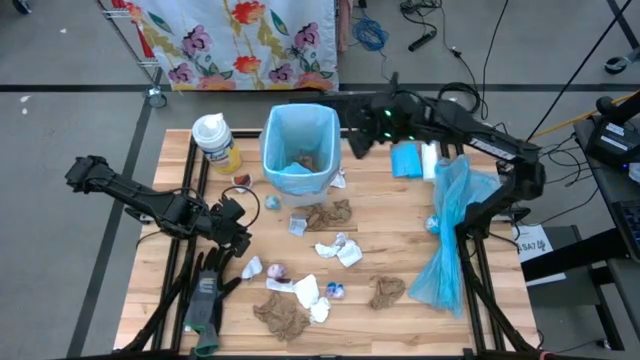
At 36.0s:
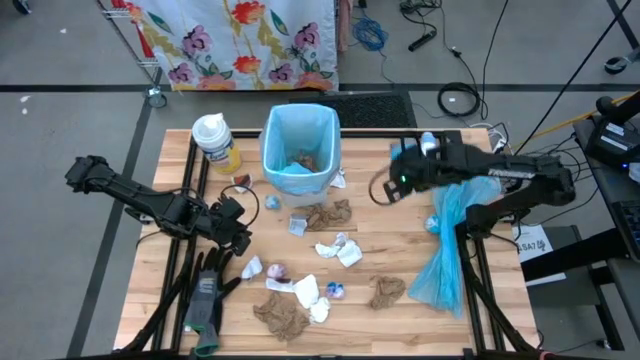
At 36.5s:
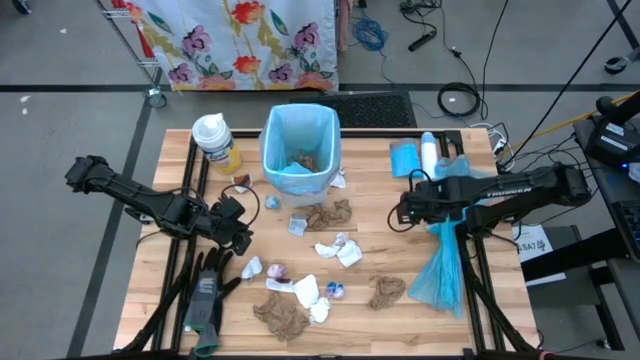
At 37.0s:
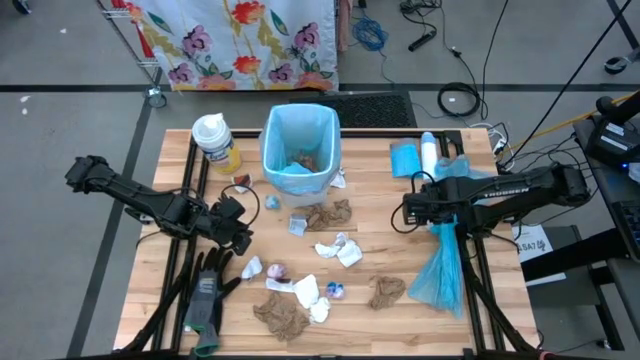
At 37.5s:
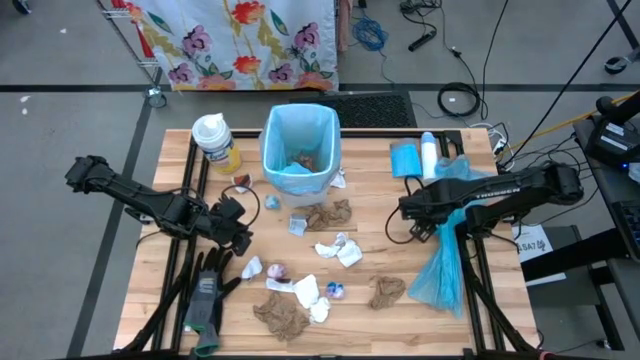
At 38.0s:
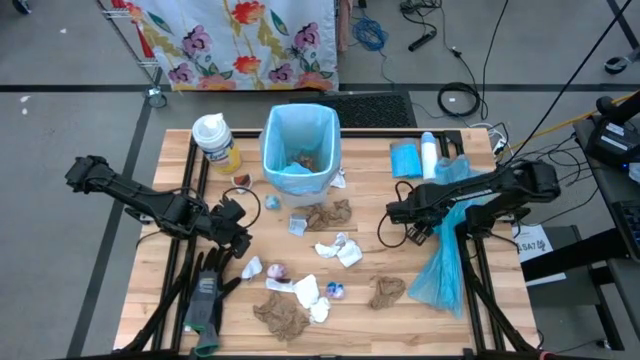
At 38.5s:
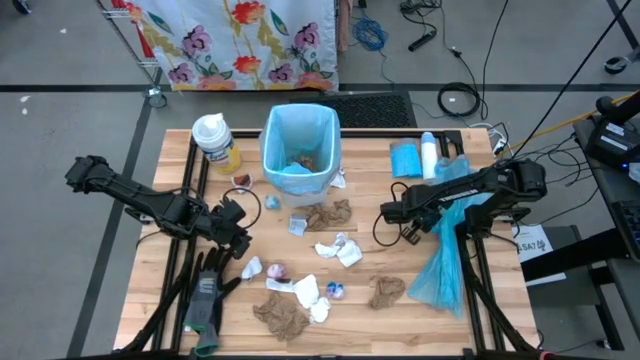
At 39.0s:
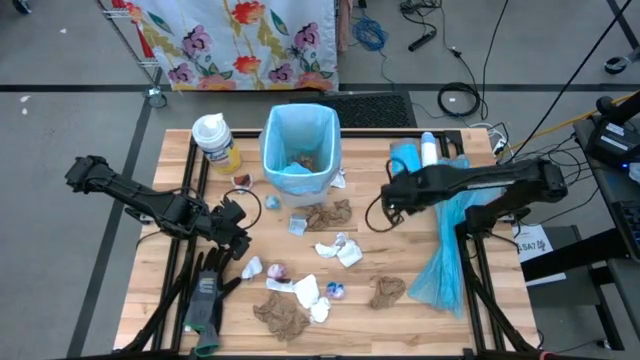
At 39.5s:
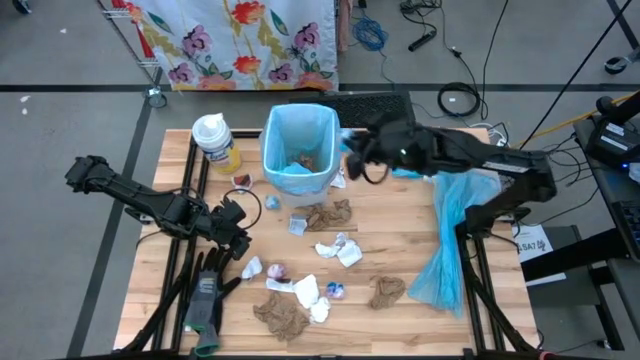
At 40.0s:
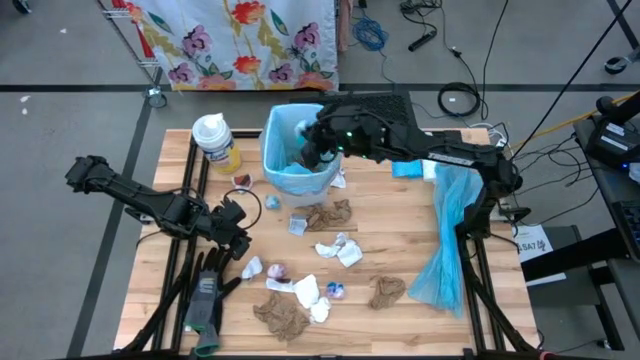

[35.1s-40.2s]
Task: place trash/remove bag and relplace
Put the blue plastic into the trash bin

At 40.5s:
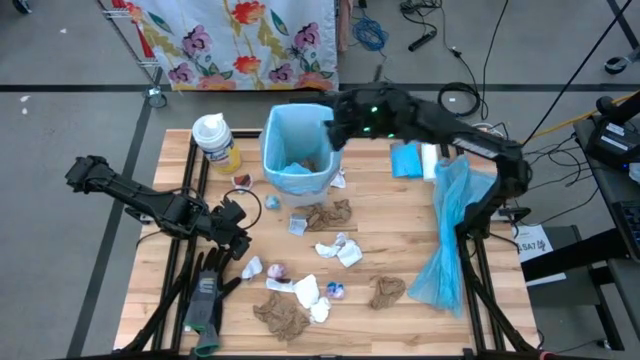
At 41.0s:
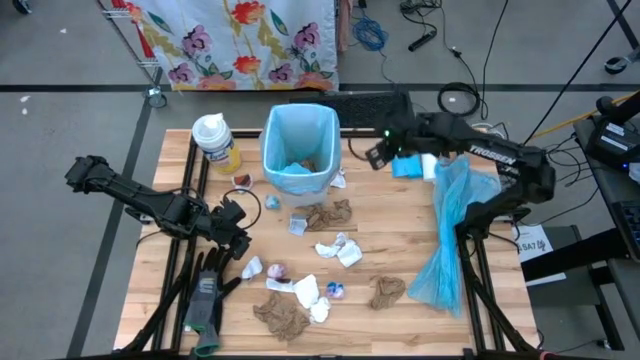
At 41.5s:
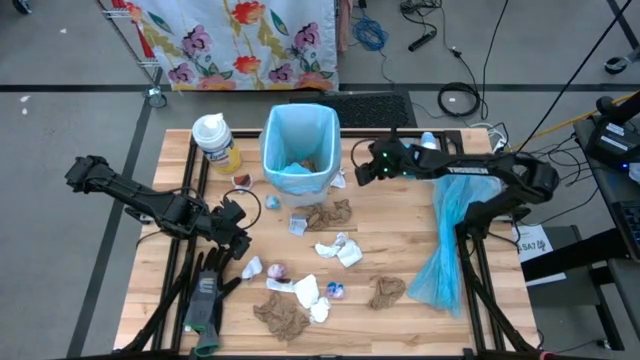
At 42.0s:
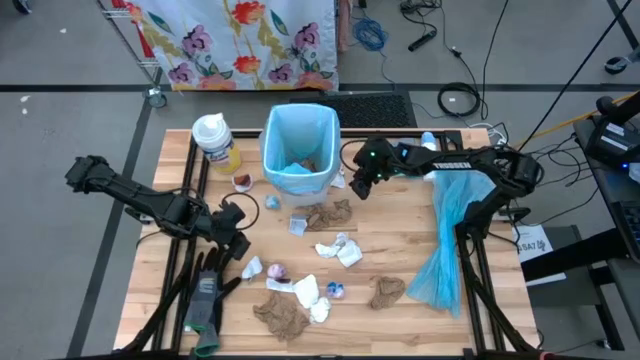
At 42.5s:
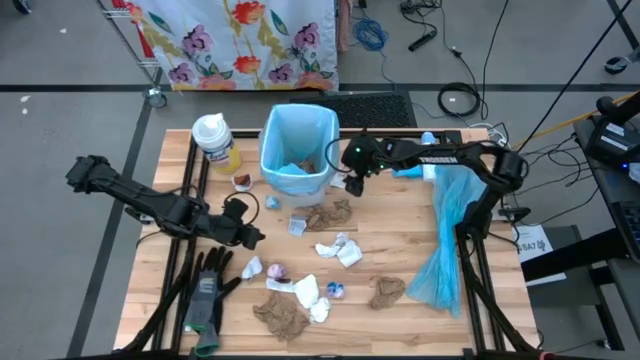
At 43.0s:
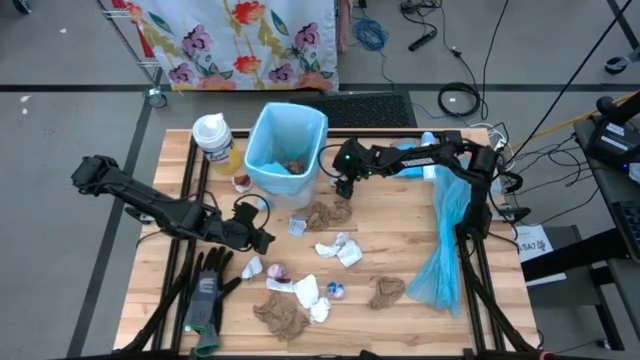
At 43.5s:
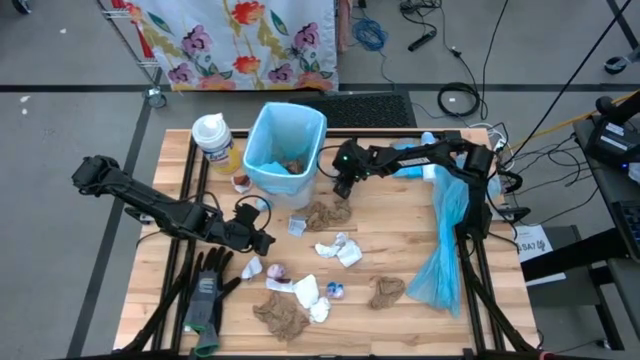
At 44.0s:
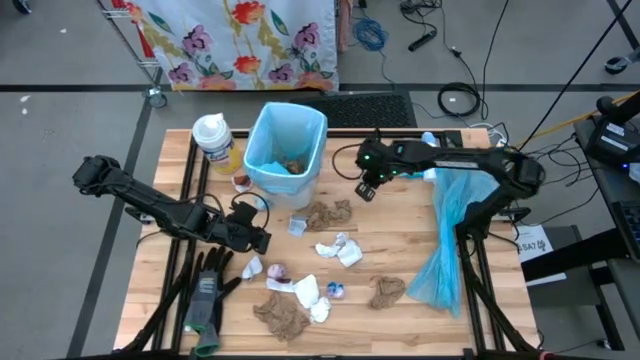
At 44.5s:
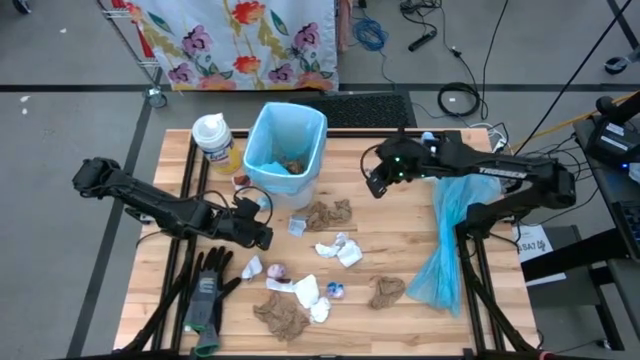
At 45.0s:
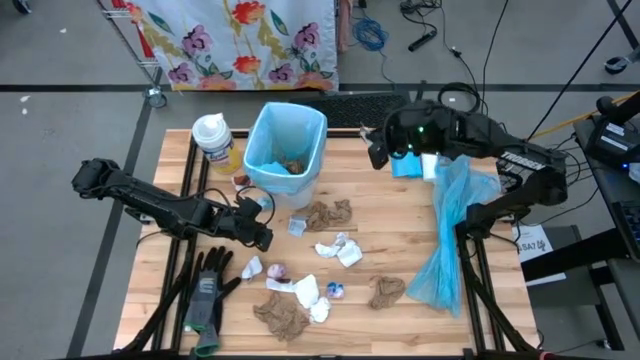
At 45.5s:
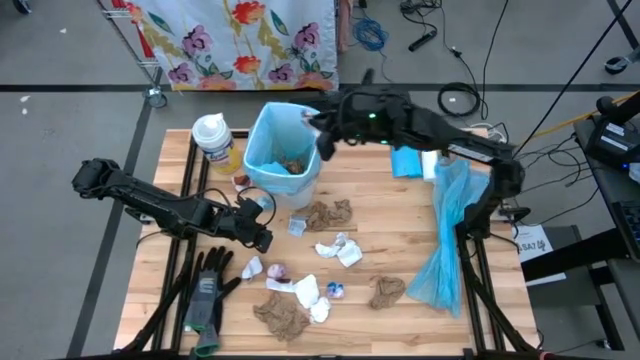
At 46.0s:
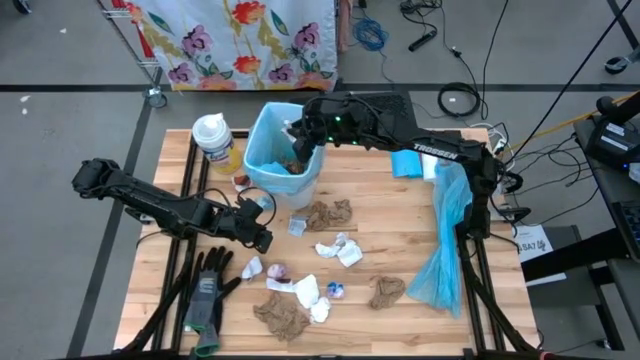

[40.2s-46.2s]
Put the white receipt paper into the trash bin

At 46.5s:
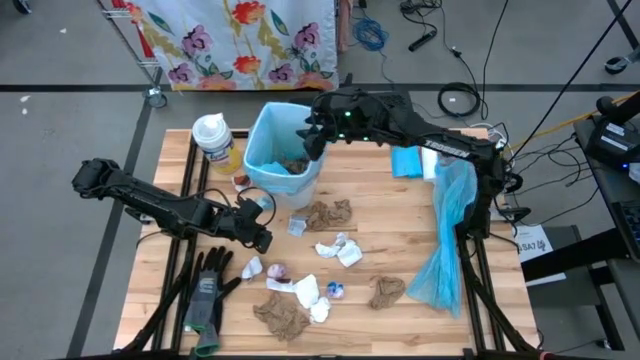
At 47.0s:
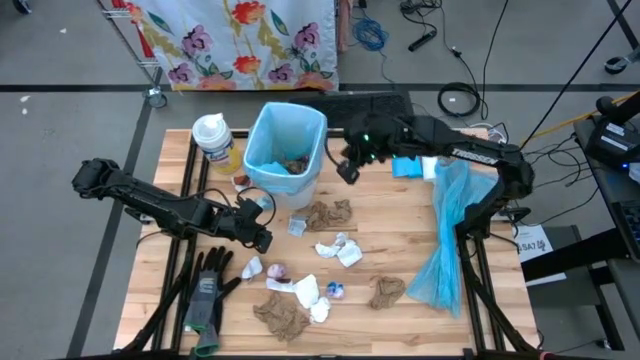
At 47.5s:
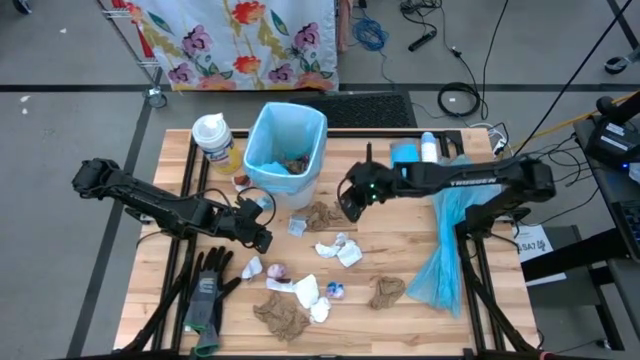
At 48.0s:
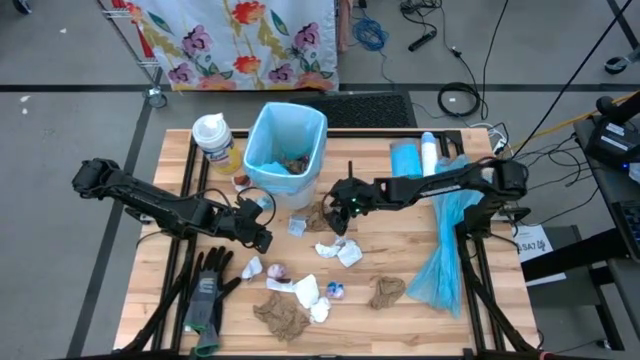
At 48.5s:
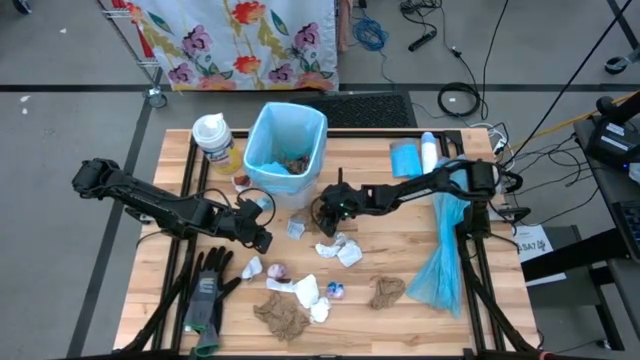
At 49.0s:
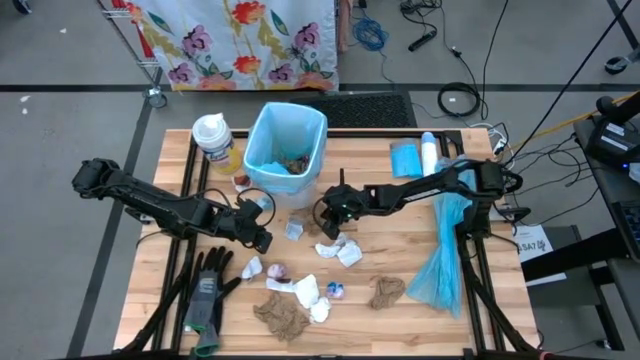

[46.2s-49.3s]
Put the brown napkin into the trash bin

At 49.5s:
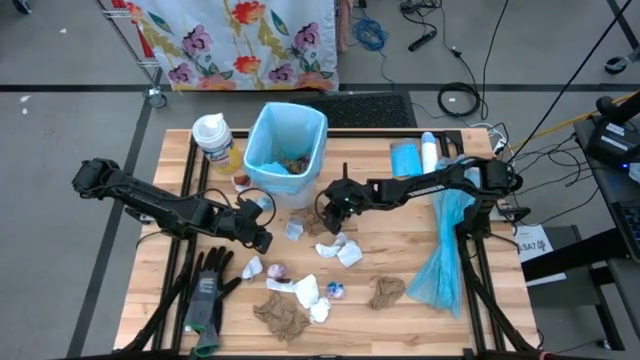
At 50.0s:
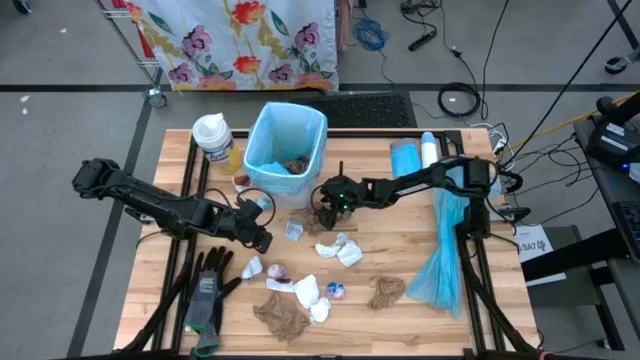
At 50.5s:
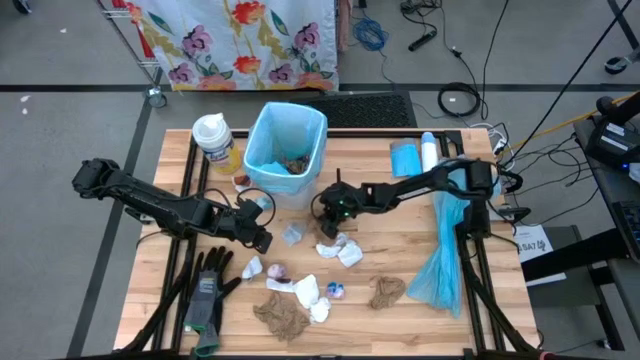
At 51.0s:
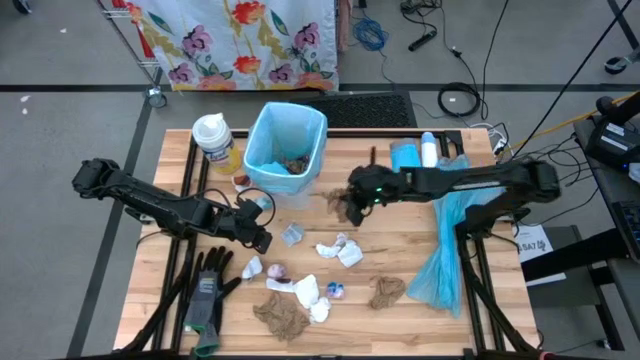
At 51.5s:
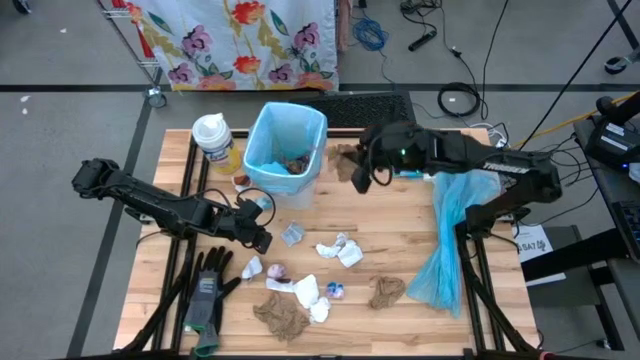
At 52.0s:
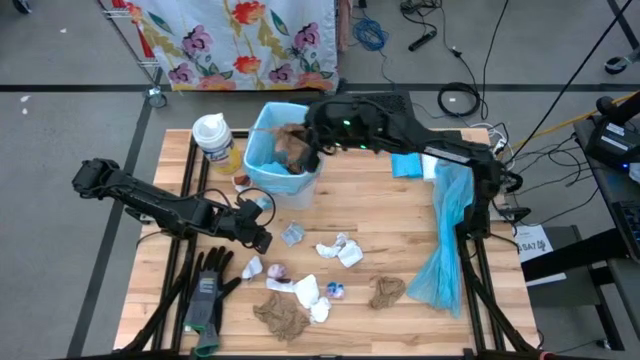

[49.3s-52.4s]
Put the brown napkin into the trash bin

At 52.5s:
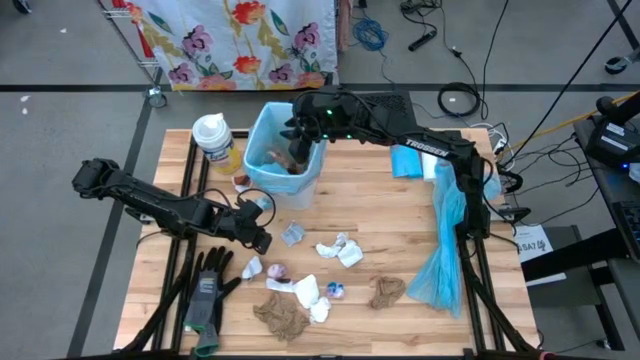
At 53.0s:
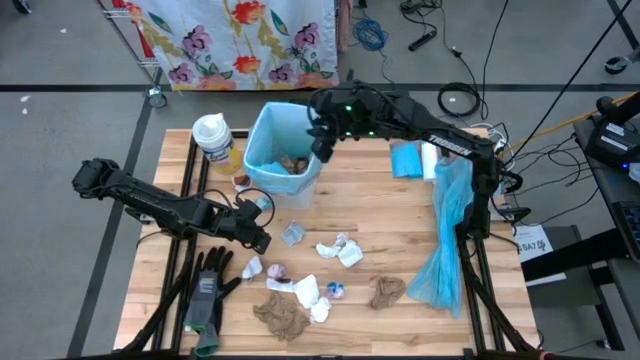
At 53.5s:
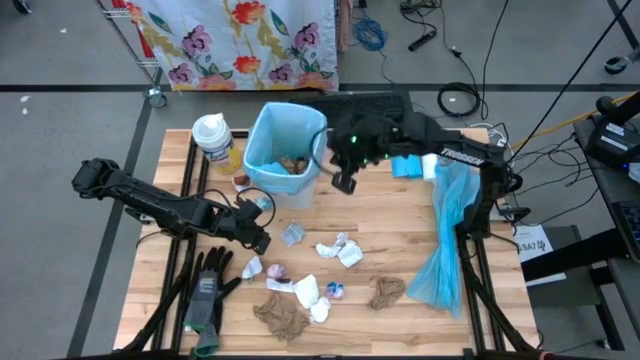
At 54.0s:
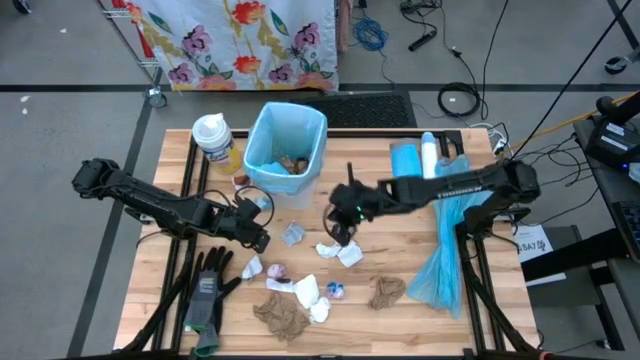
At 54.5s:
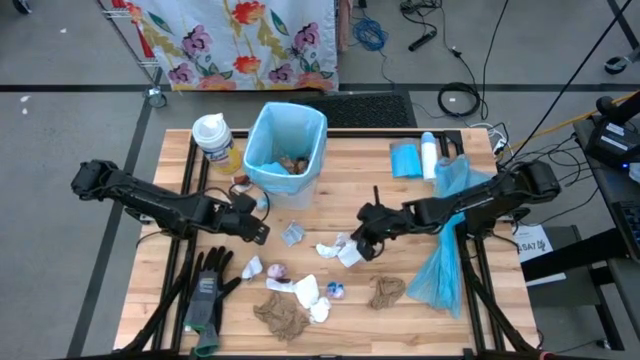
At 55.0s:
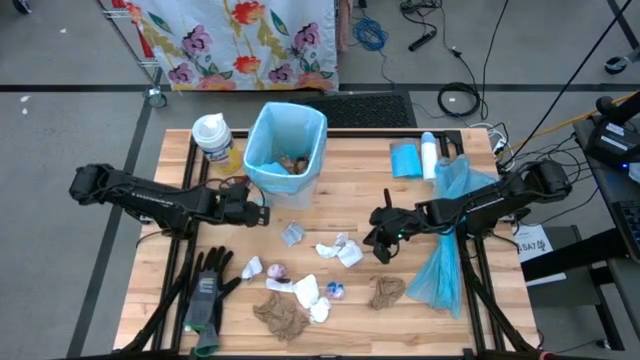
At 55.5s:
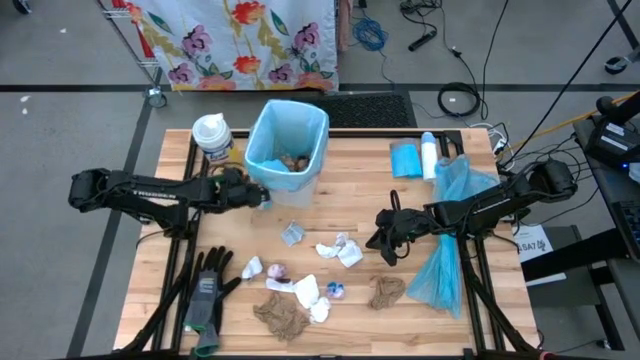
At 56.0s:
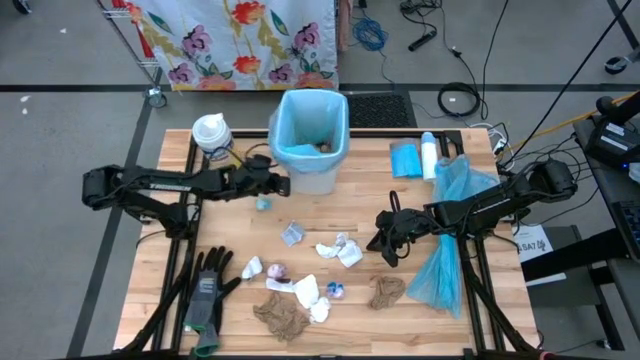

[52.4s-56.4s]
Adjust the trash bin
